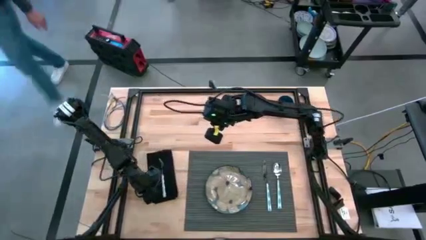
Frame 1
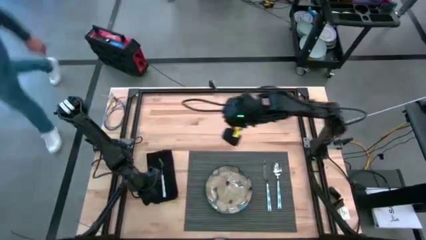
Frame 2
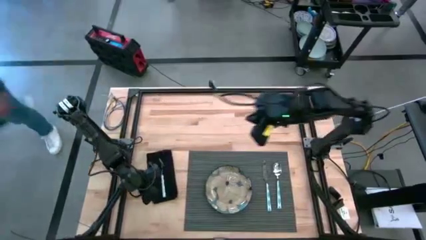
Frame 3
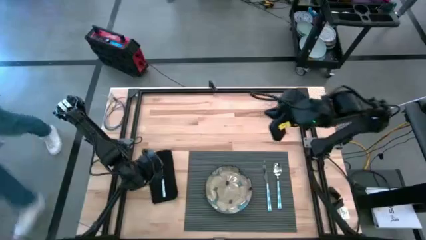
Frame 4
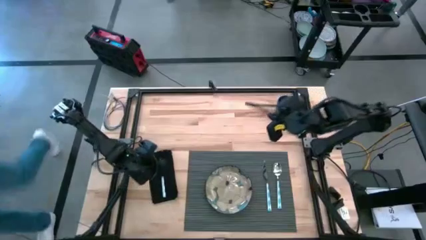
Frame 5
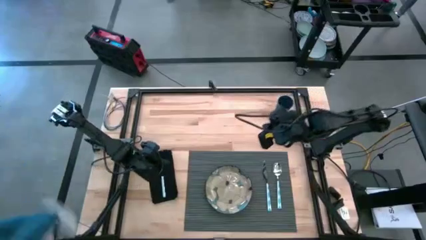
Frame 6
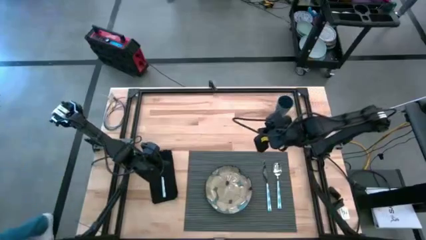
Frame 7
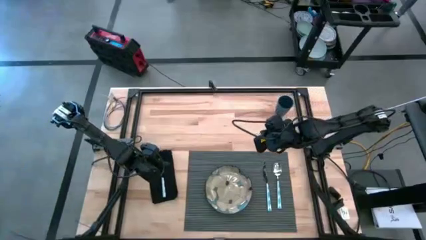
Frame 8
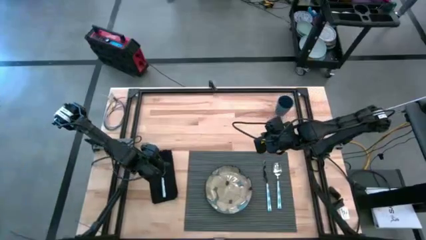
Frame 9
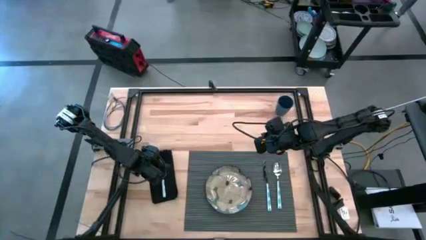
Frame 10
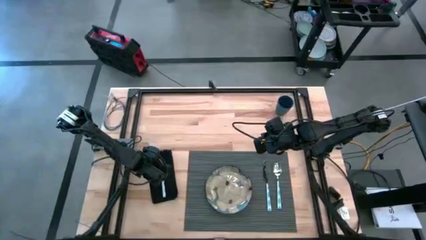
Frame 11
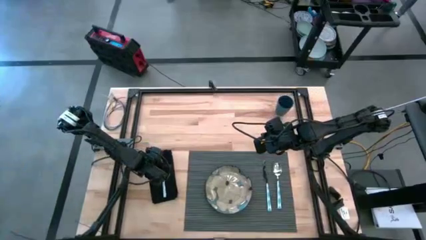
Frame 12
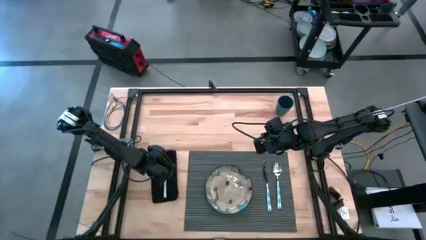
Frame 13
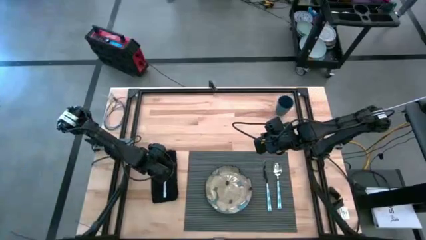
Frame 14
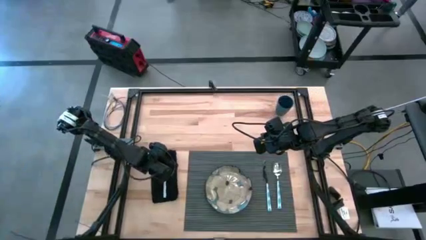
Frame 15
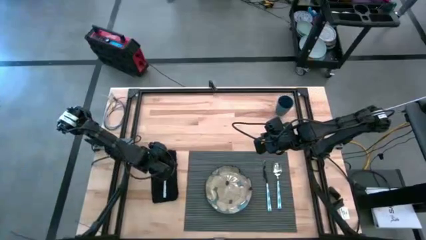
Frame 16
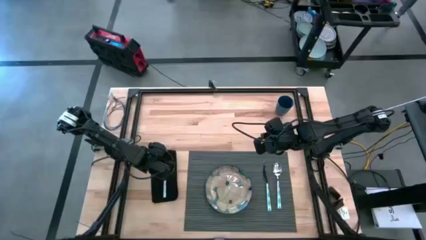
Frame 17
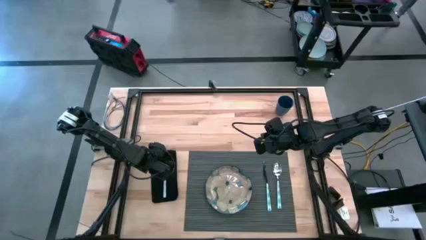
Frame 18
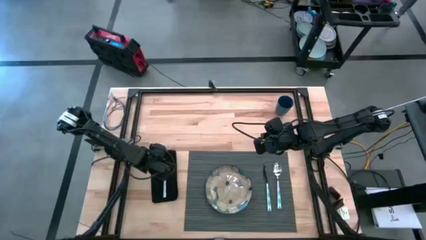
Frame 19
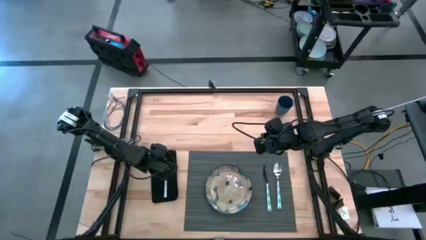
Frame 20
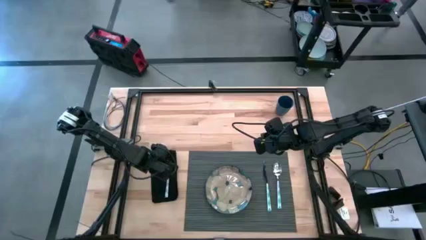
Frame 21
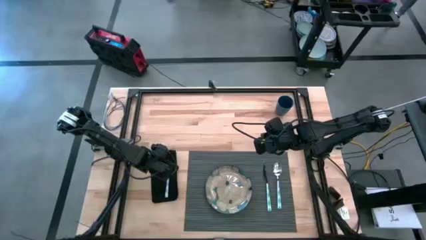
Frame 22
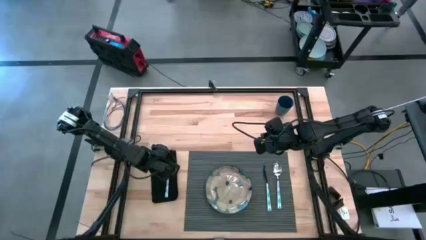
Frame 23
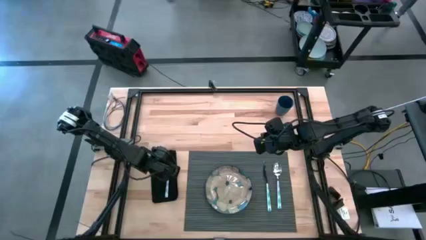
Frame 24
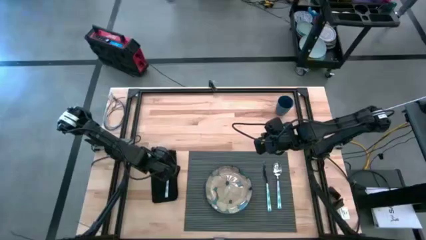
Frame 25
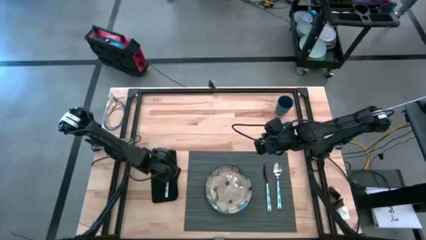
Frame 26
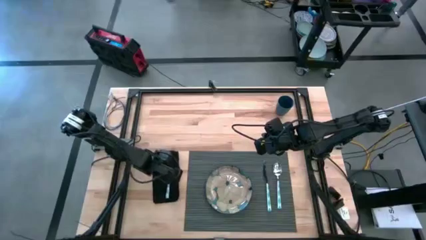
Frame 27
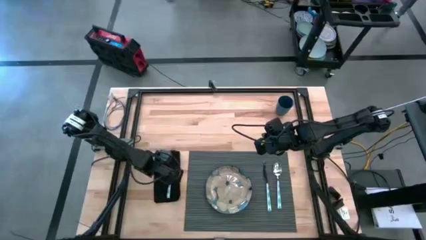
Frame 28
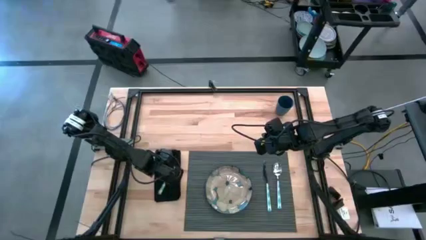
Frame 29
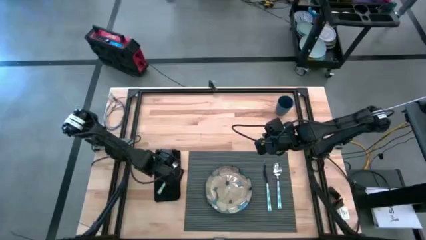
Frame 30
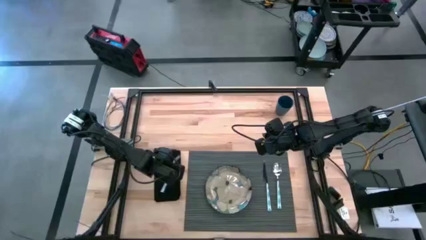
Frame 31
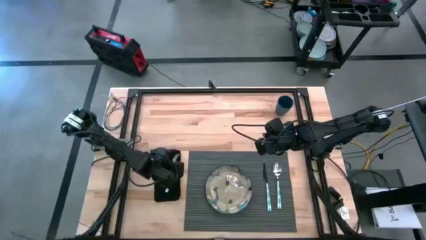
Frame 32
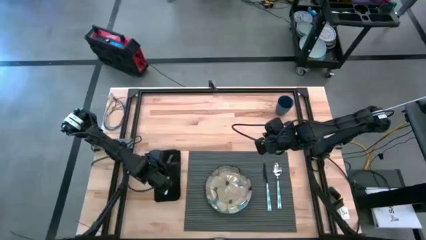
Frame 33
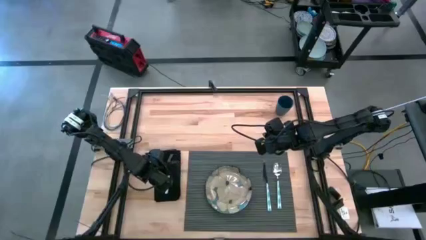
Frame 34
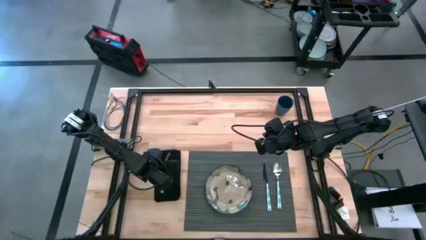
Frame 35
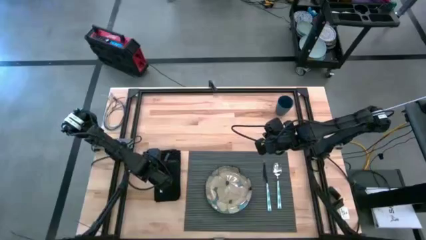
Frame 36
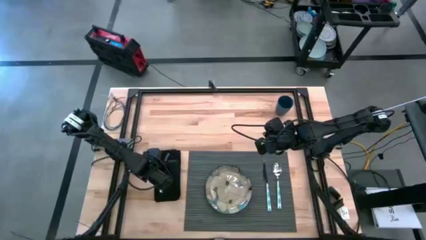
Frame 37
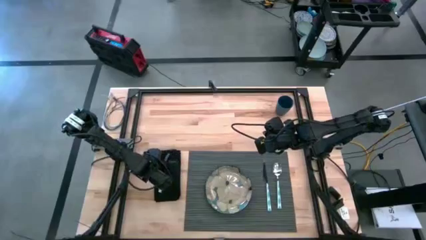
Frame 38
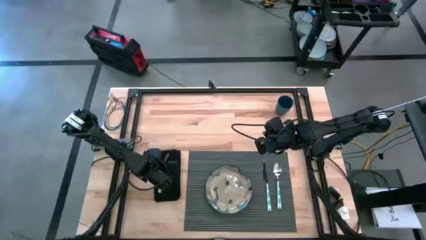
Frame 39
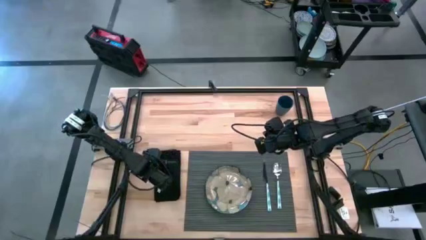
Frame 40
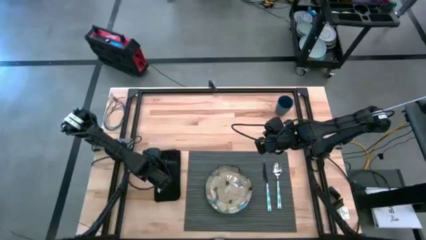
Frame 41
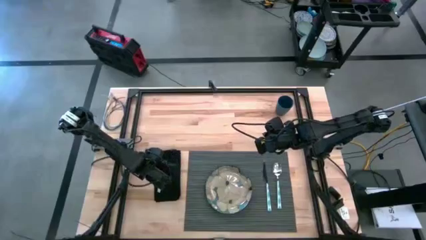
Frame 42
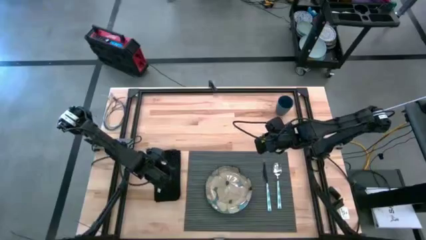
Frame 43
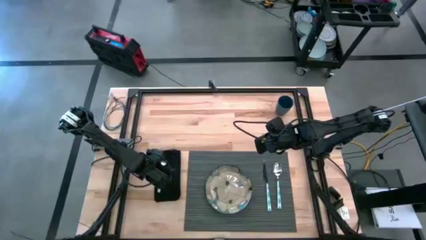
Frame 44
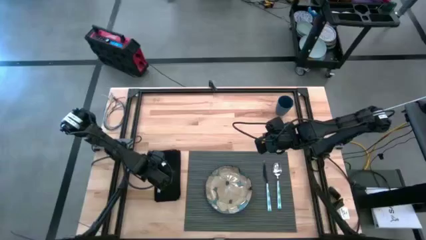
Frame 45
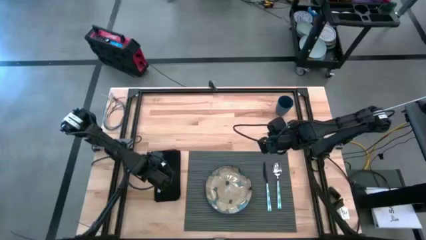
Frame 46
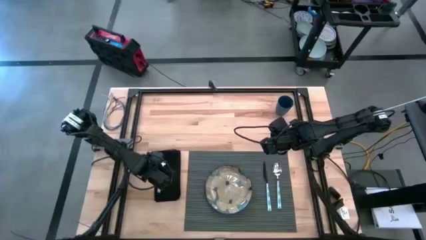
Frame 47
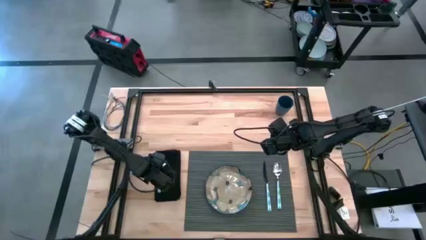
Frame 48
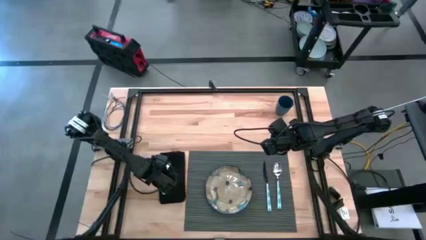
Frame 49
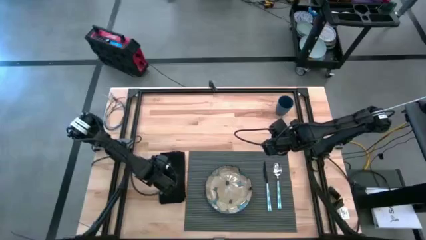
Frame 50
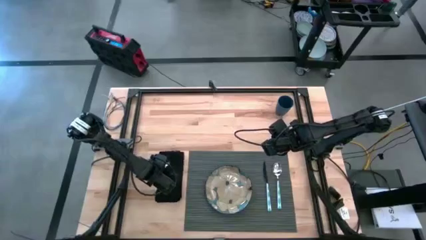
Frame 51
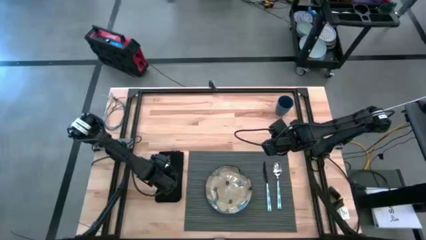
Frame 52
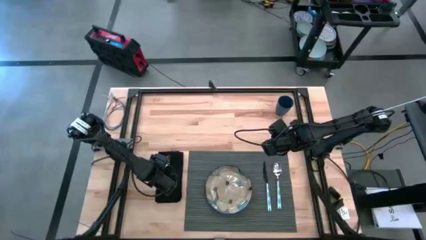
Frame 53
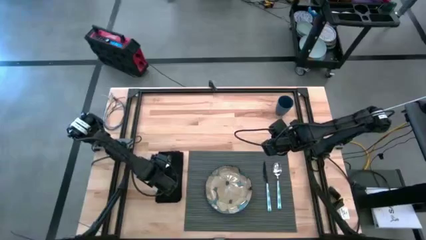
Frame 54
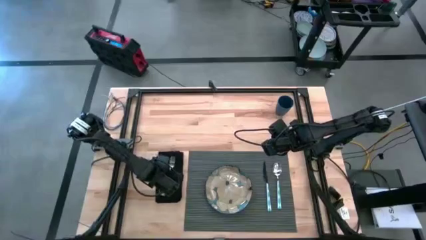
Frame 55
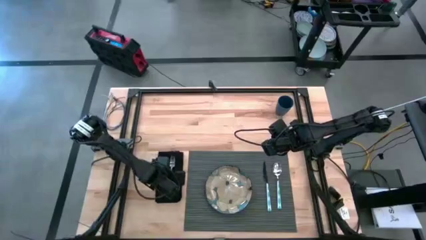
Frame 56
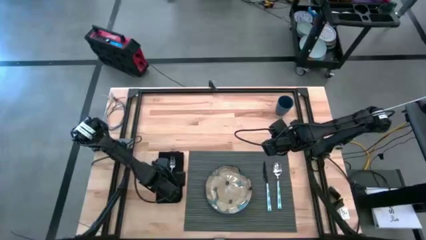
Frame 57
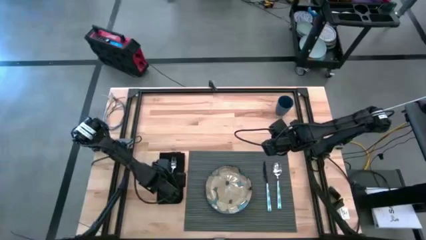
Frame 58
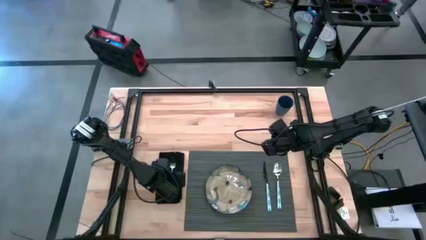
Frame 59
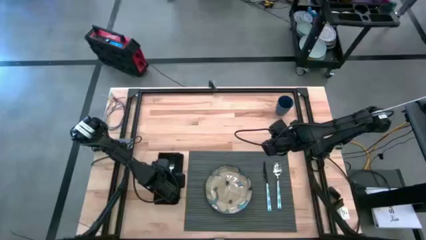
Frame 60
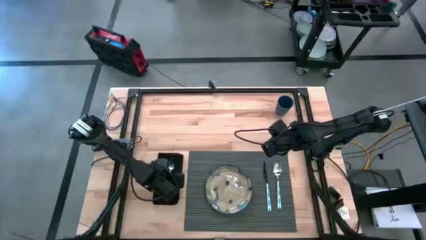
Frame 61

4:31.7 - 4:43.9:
Task: Set table place
Adjust the blue fork on the folded black napkin

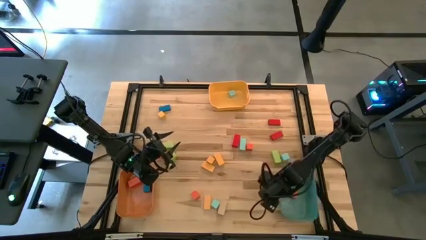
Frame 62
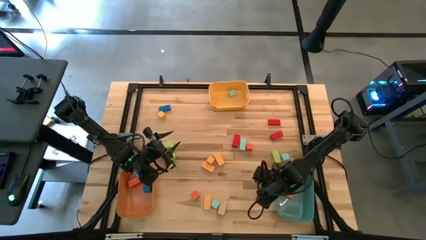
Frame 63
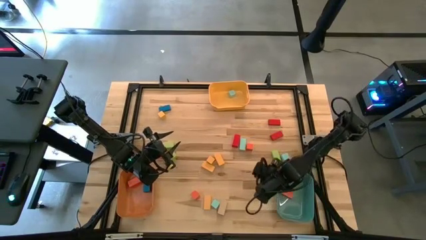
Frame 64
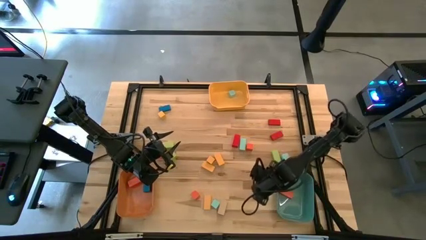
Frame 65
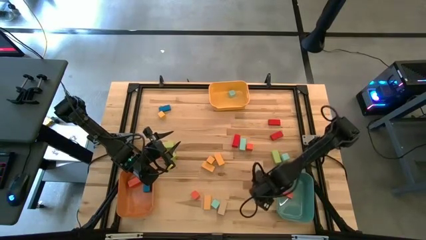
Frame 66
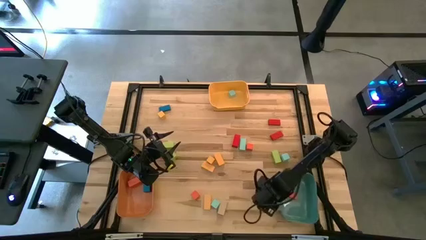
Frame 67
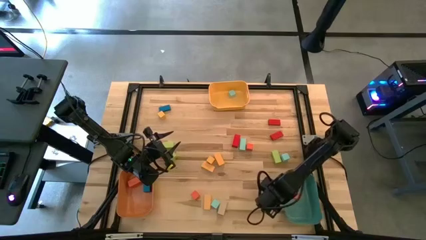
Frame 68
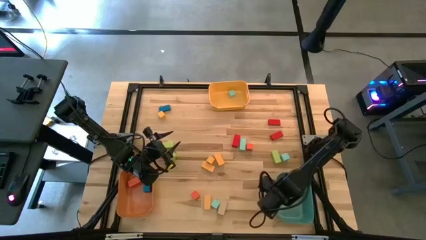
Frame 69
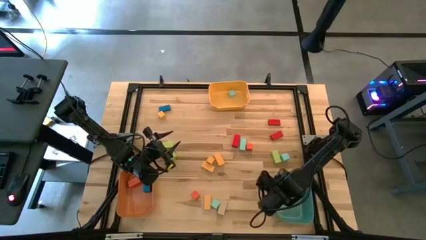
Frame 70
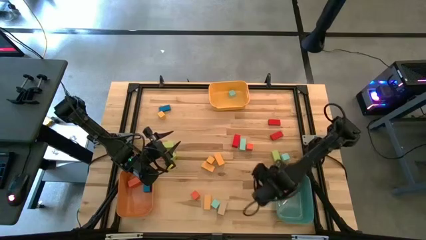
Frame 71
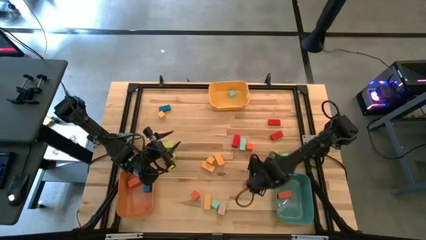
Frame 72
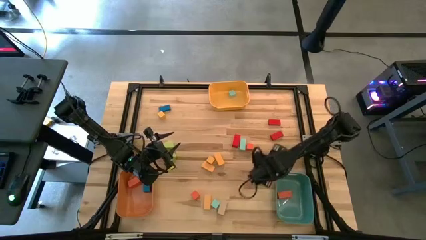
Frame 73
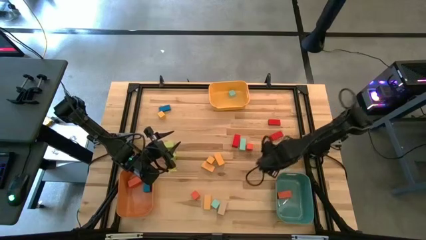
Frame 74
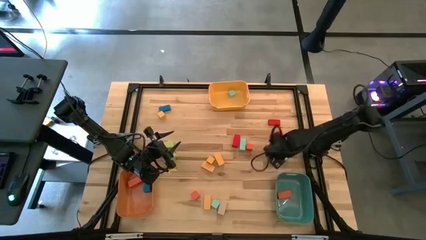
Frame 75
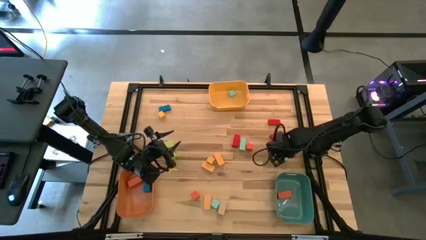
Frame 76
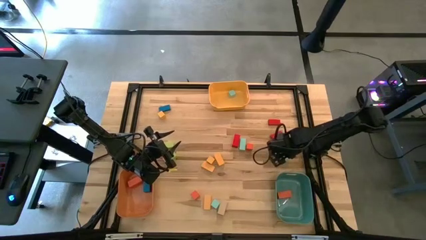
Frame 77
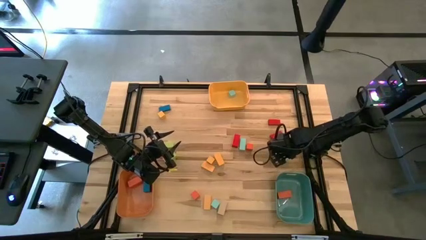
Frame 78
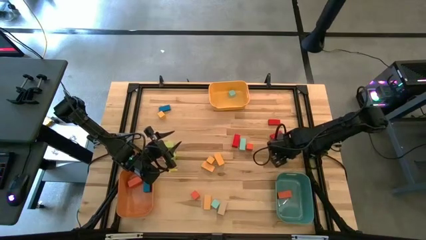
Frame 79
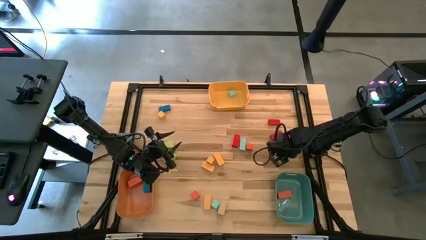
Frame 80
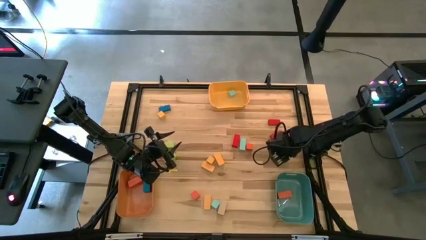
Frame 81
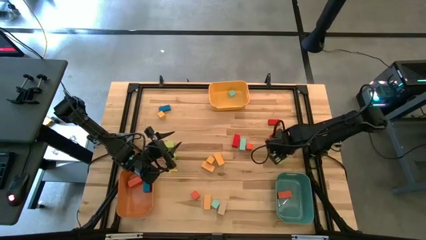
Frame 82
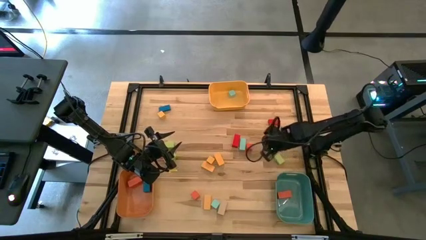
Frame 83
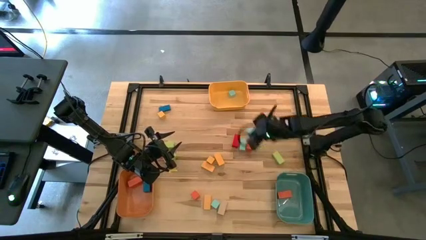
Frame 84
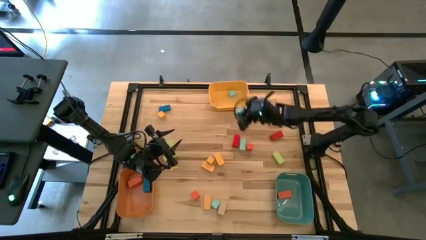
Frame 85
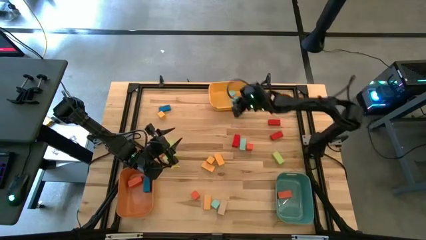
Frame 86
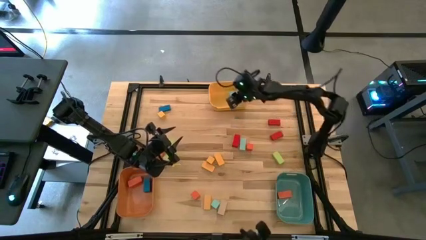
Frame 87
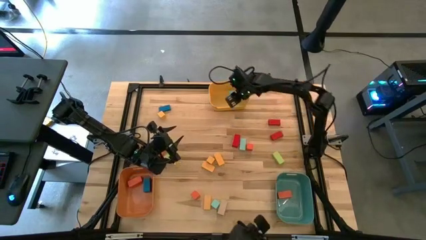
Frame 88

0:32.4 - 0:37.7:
Task: Sort blocks by size
Put the small light blue block into the yellow bin
